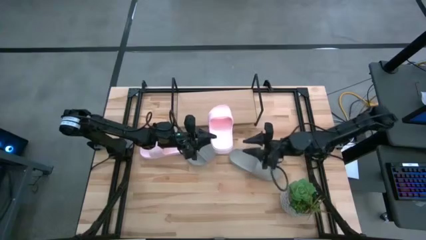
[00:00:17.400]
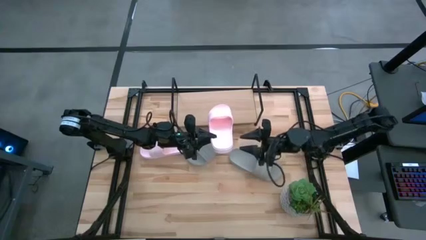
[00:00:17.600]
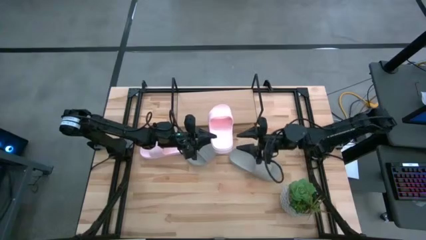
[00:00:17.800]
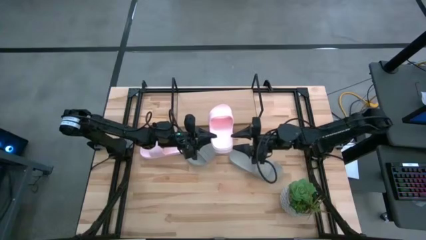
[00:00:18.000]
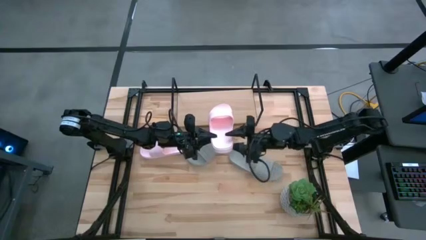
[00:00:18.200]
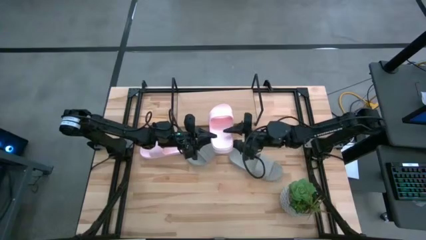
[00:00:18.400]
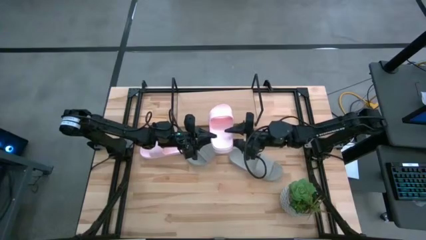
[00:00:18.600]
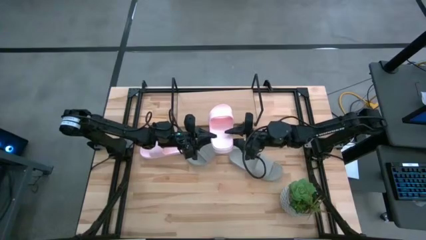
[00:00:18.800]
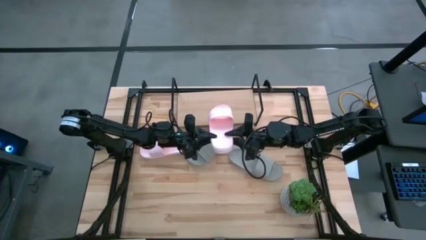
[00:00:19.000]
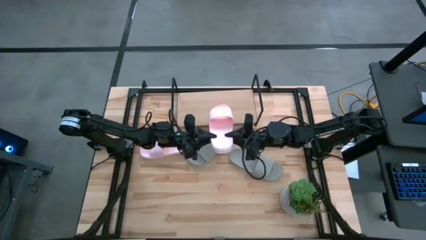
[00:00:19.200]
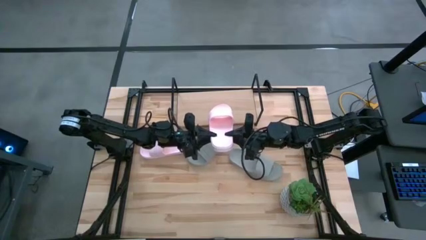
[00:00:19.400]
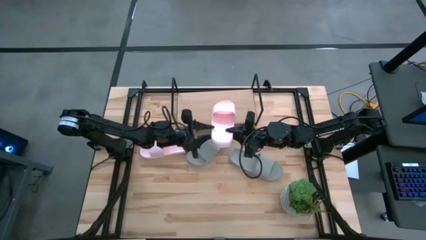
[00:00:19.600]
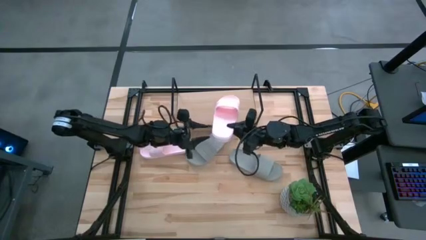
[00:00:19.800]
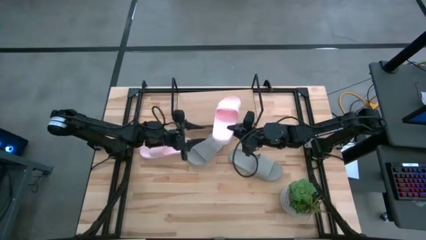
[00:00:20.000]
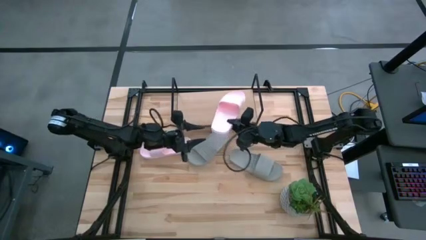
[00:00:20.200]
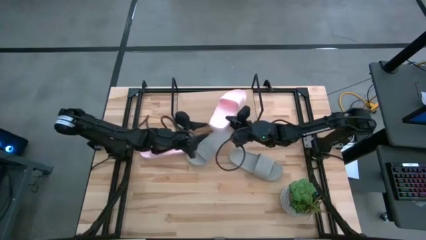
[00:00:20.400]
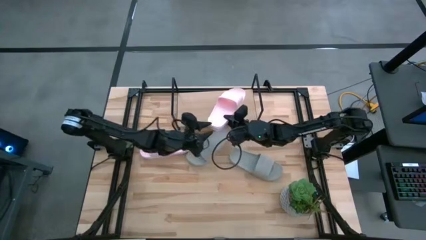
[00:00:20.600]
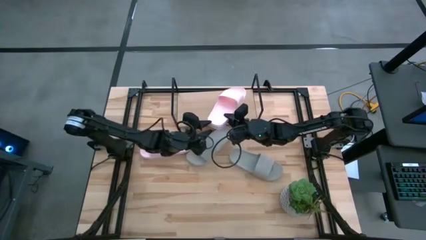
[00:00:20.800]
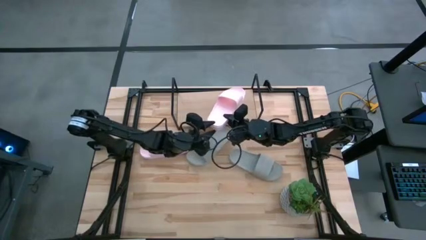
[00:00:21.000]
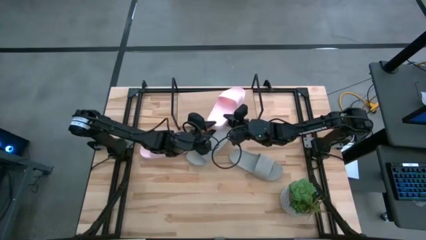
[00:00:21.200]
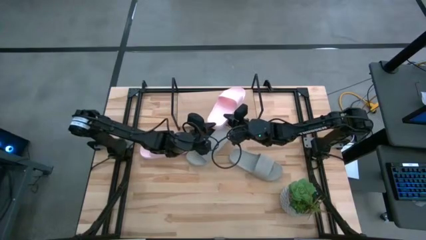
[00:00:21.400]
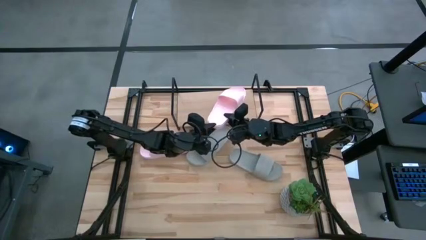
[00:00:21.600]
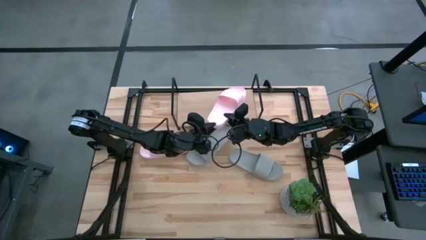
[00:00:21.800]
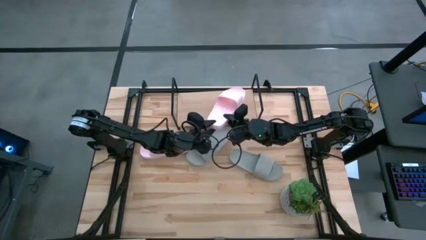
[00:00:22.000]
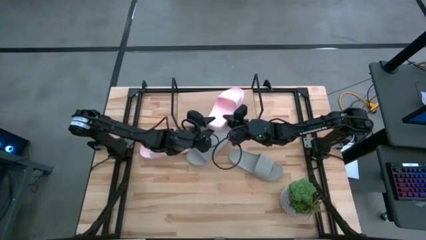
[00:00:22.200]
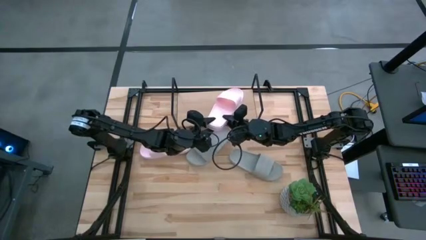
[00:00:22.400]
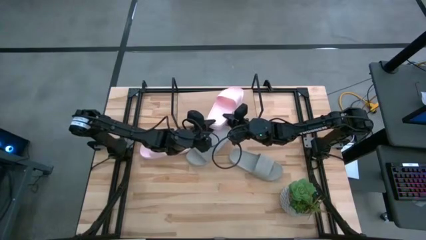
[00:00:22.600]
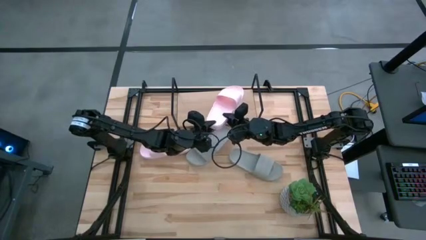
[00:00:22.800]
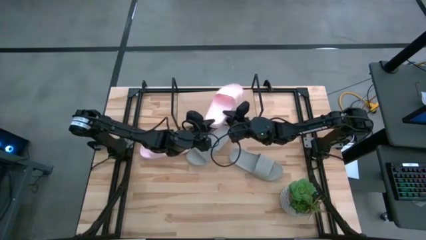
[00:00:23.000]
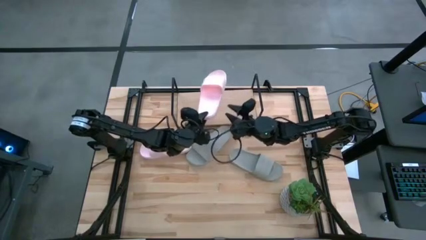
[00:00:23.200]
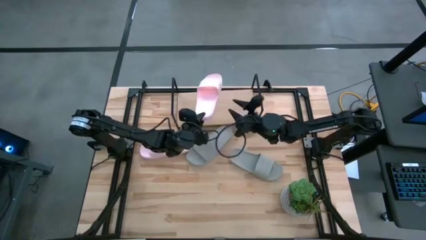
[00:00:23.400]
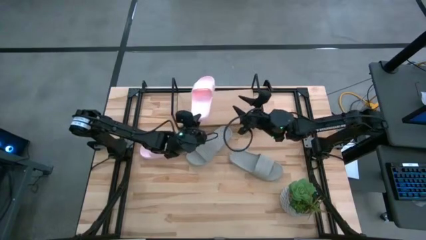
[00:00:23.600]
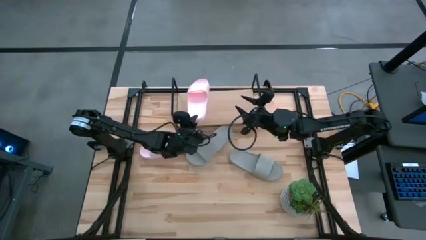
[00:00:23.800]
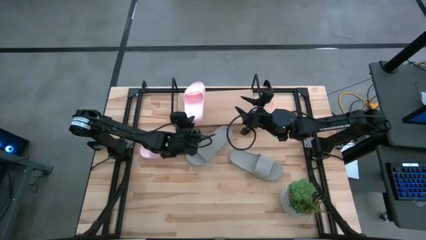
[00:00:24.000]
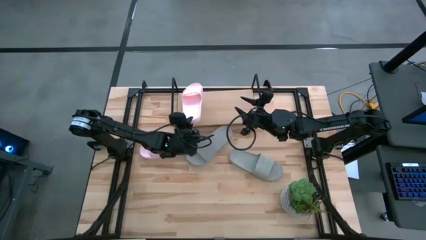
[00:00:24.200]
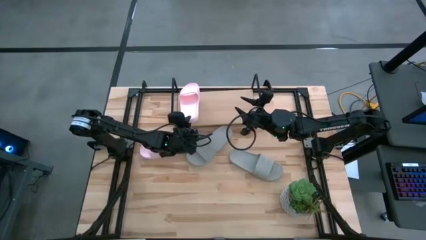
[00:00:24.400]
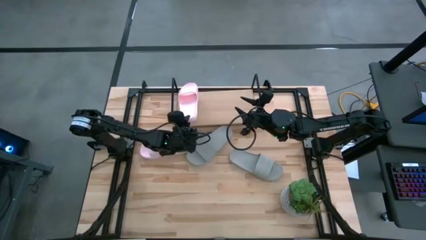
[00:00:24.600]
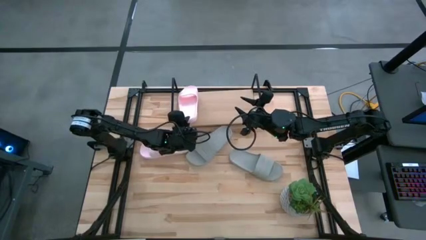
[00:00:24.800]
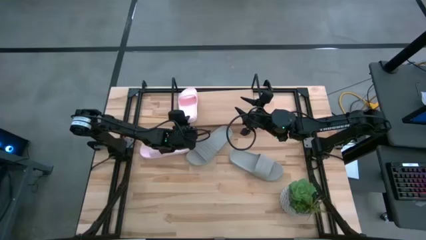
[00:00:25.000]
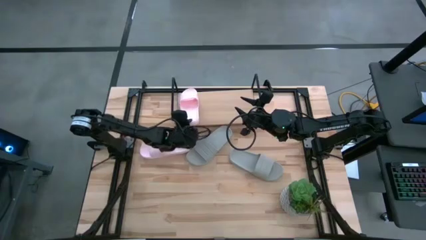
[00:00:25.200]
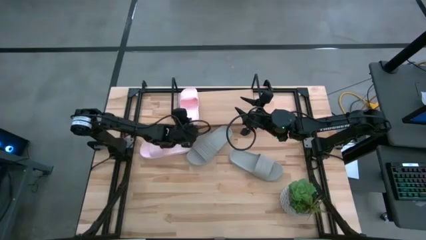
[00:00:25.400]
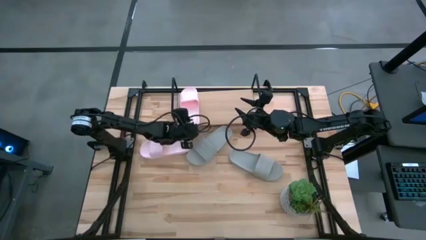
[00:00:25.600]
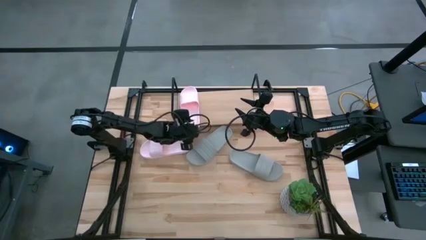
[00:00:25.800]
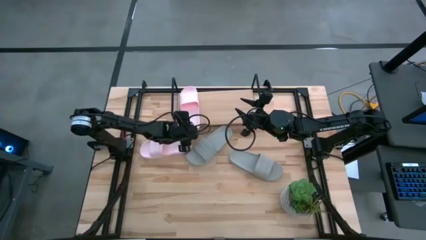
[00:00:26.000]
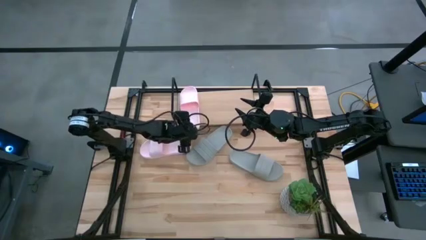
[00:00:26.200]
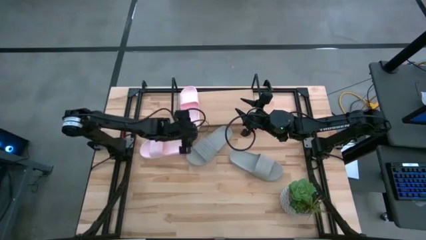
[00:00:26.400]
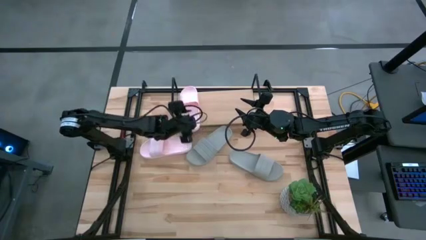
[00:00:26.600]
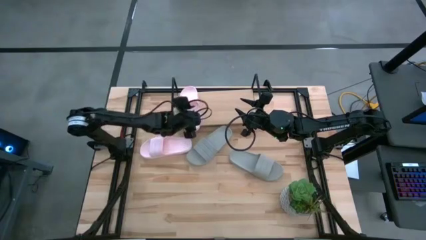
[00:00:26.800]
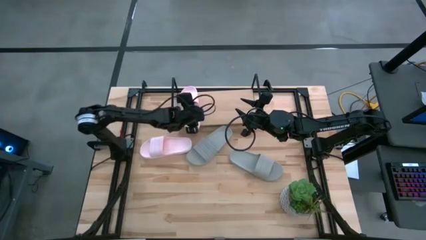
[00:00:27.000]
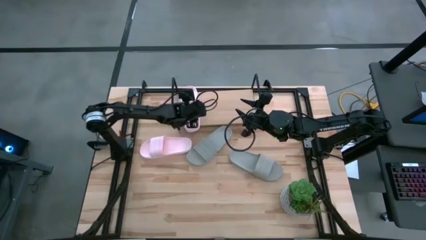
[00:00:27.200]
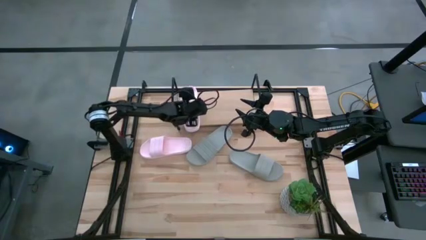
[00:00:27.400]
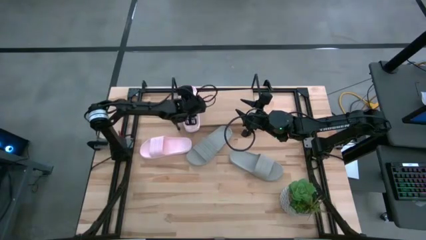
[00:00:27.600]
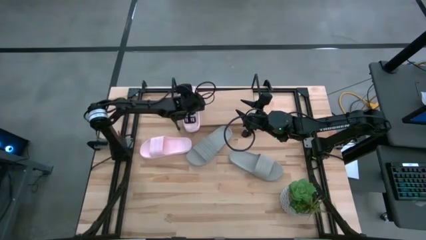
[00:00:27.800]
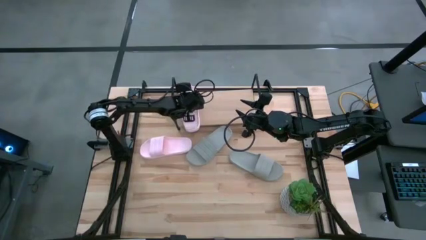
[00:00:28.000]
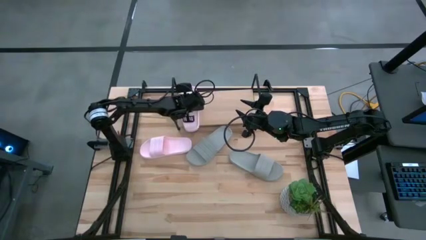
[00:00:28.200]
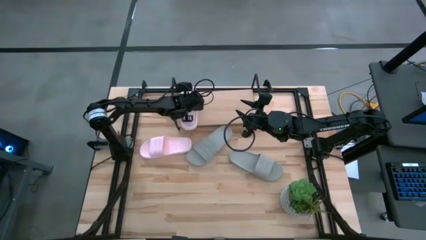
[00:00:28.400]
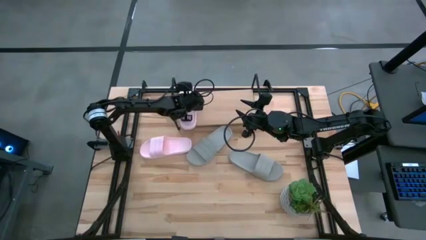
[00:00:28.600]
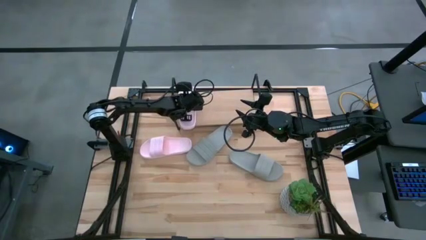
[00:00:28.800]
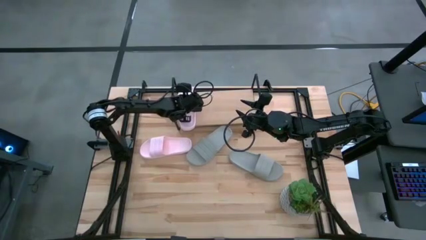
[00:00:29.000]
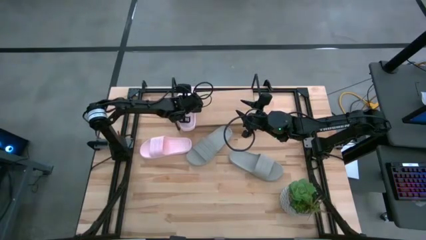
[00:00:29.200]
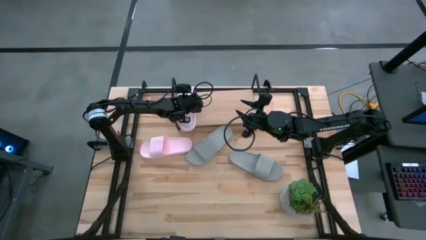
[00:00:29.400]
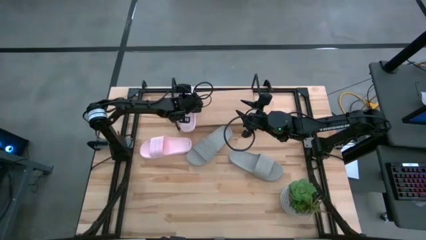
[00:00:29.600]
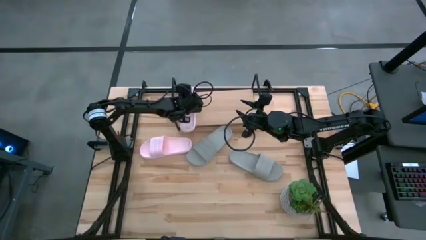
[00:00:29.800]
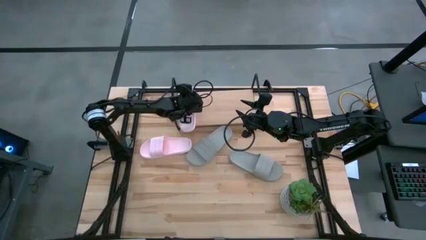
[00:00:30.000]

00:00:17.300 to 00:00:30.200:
Task: Pick and place slides into the shelf
Put the right pink slides on the shelf

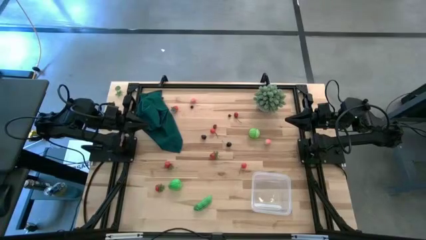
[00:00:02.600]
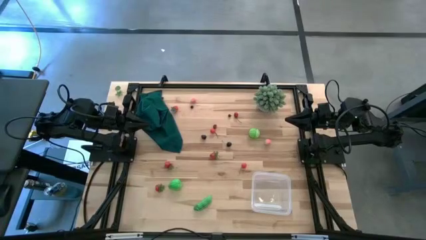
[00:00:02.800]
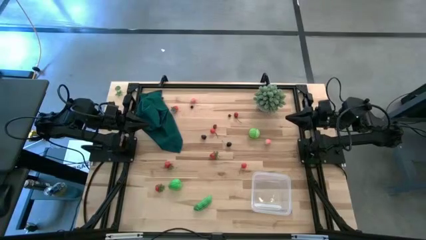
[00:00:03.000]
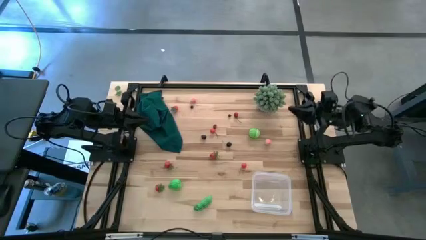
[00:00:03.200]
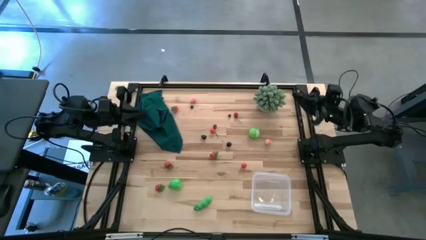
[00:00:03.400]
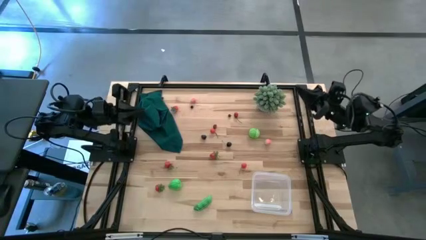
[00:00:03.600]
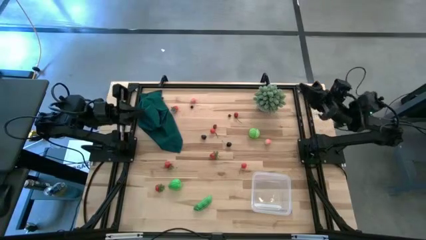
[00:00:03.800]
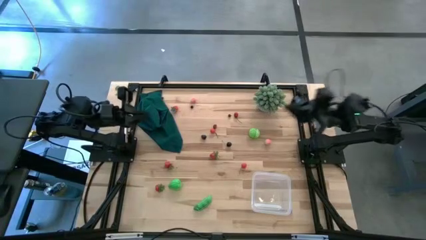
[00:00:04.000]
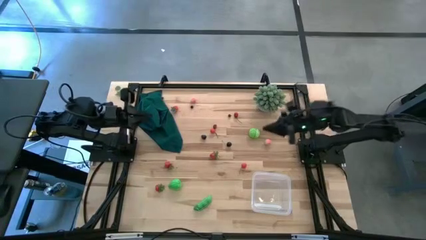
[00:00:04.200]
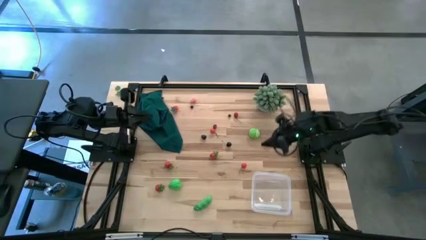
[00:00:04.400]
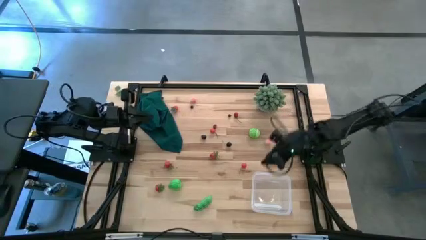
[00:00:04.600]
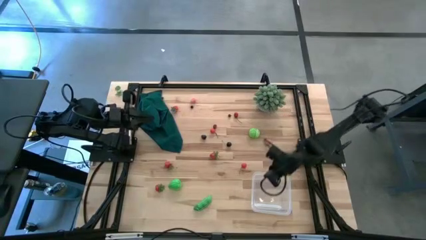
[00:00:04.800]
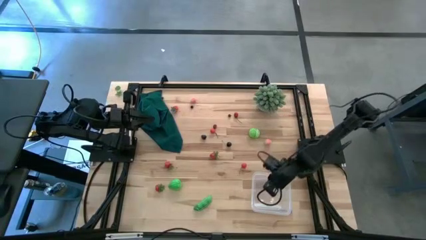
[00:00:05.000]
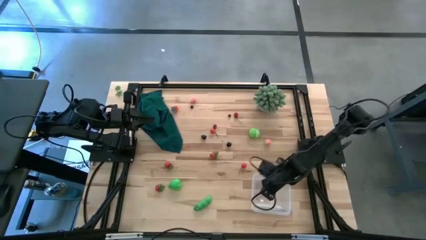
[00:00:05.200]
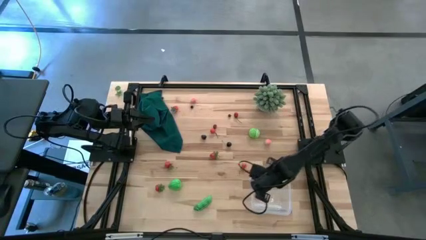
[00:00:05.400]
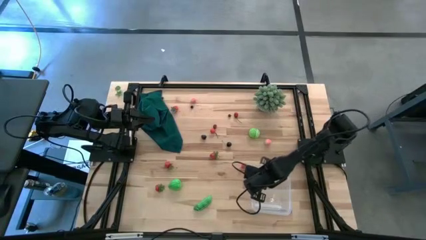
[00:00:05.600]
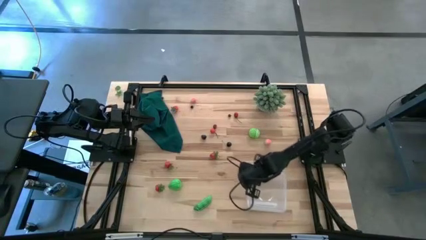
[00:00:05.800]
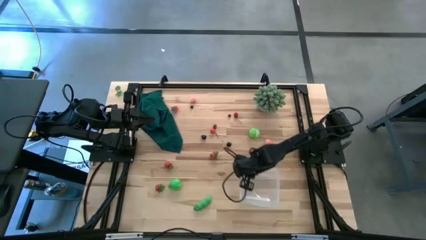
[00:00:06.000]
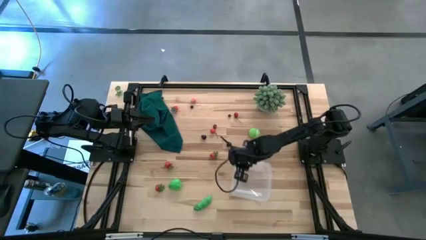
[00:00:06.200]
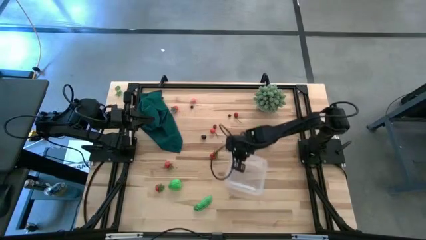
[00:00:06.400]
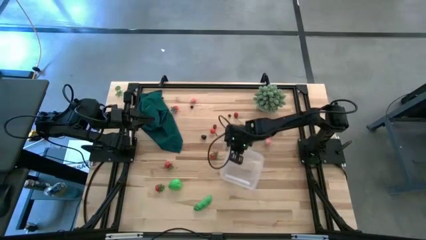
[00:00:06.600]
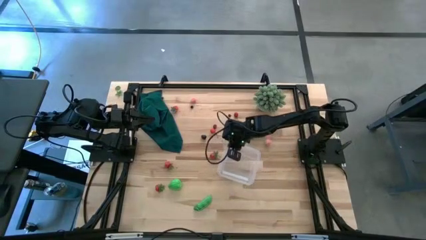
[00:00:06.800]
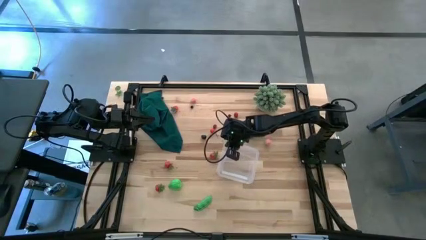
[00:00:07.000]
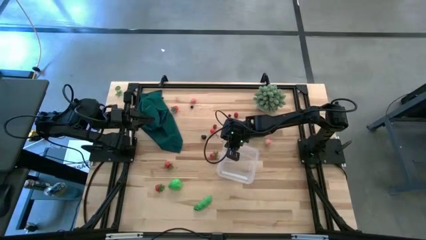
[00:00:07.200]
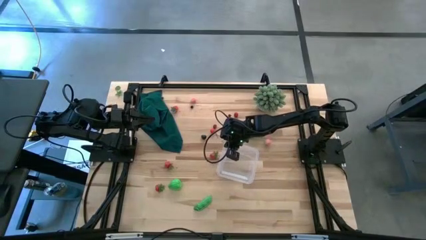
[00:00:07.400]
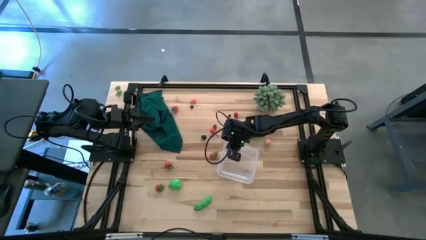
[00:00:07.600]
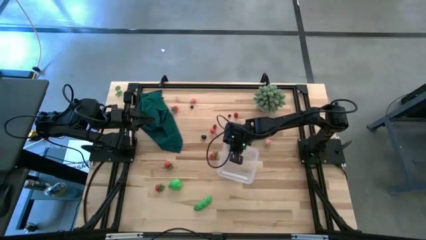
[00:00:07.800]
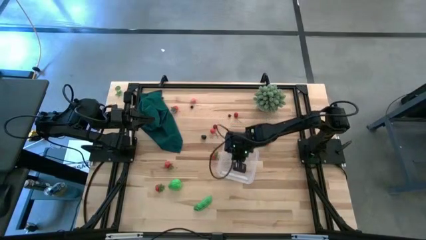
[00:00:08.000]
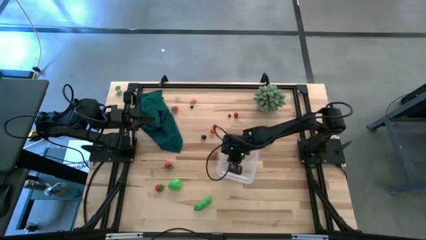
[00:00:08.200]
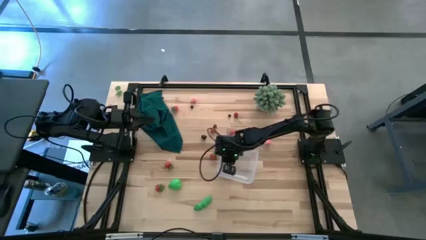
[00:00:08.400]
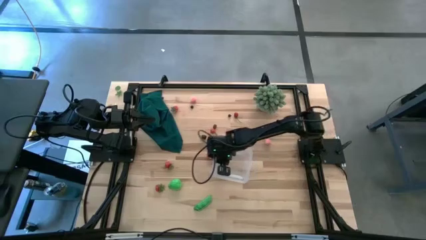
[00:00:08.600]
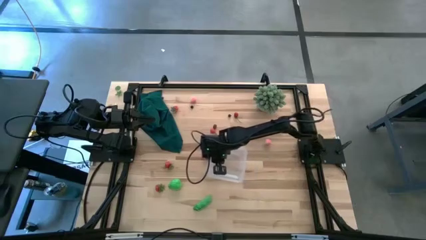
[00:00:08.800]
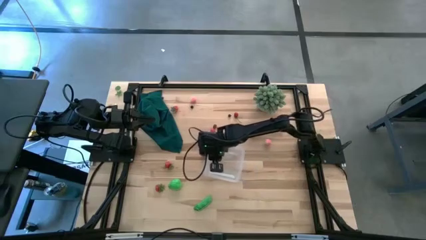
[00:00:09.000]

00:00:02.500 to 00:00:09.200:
Task: Pick and placing Produce into tupperware
Move the container to the center of the table
